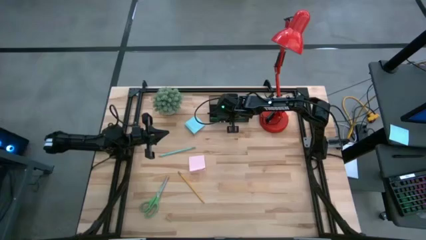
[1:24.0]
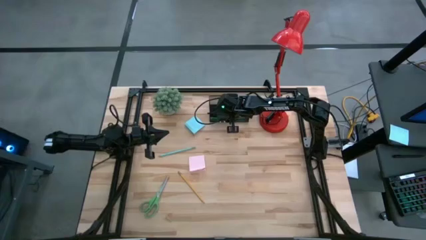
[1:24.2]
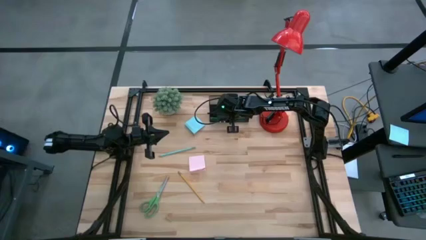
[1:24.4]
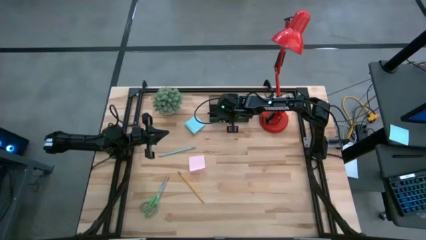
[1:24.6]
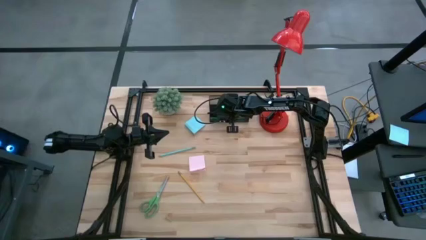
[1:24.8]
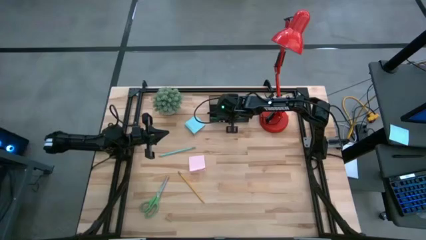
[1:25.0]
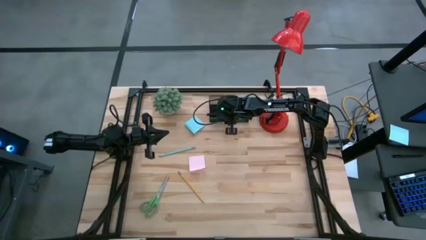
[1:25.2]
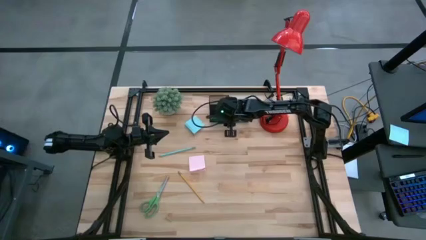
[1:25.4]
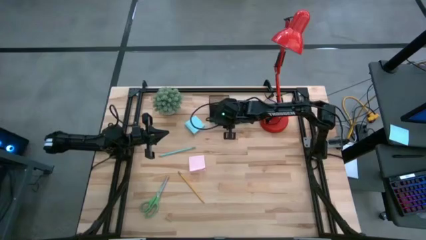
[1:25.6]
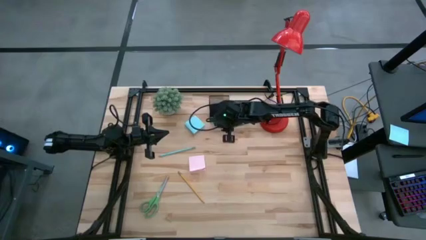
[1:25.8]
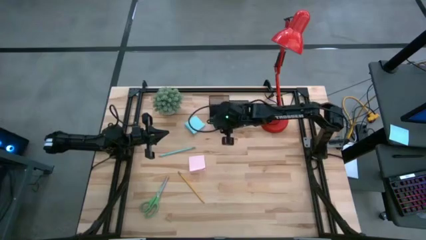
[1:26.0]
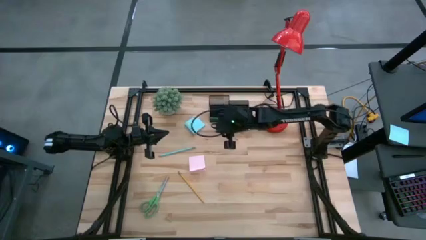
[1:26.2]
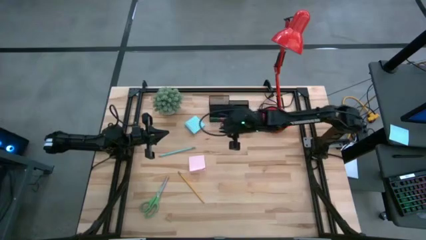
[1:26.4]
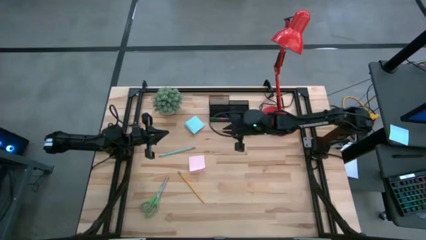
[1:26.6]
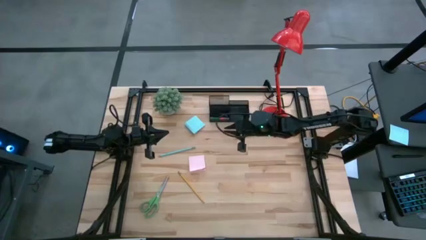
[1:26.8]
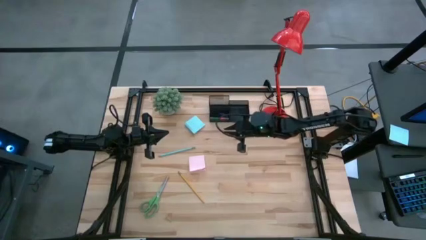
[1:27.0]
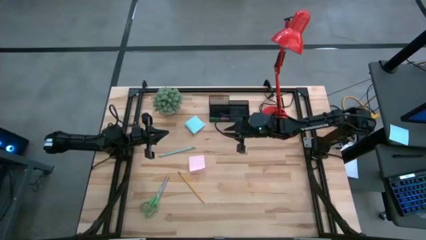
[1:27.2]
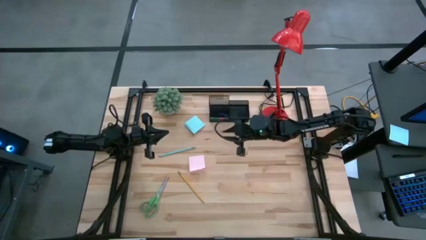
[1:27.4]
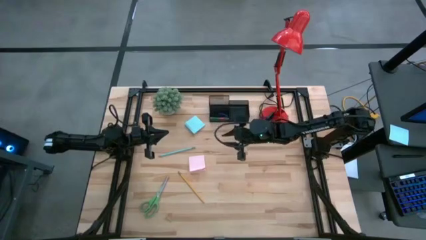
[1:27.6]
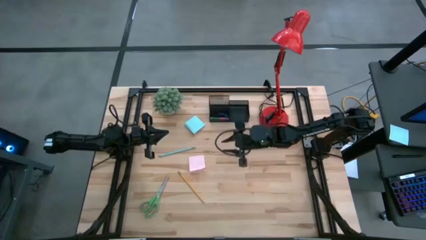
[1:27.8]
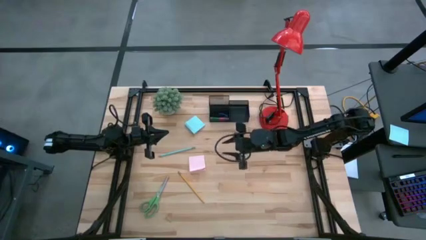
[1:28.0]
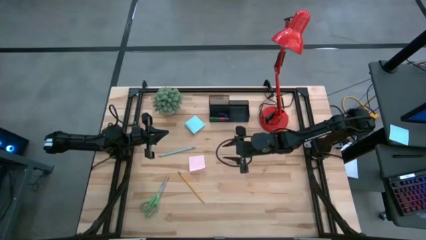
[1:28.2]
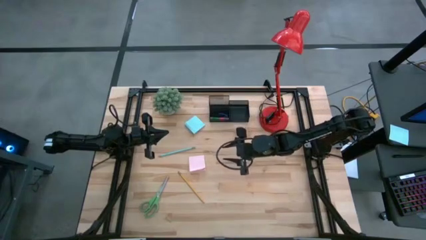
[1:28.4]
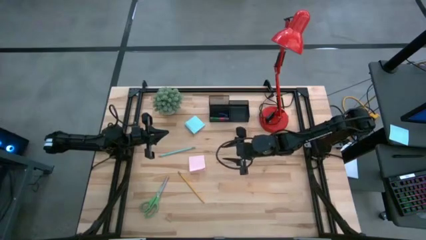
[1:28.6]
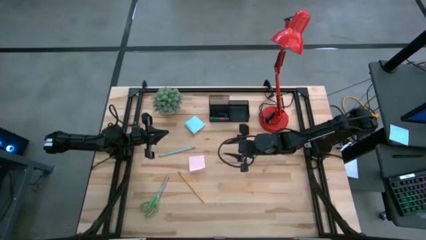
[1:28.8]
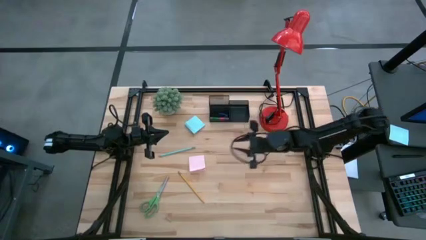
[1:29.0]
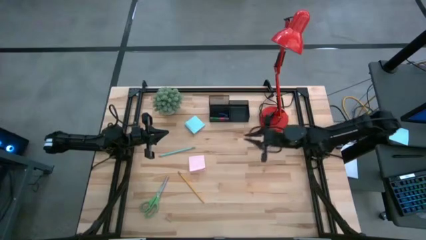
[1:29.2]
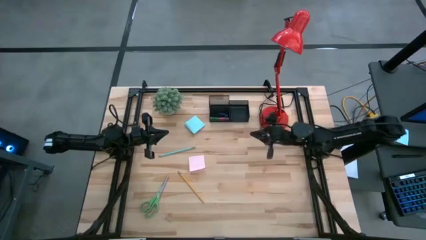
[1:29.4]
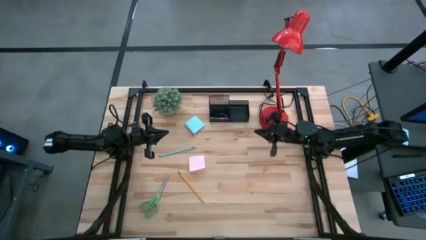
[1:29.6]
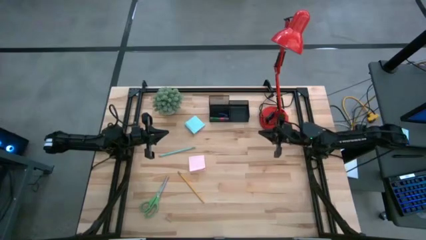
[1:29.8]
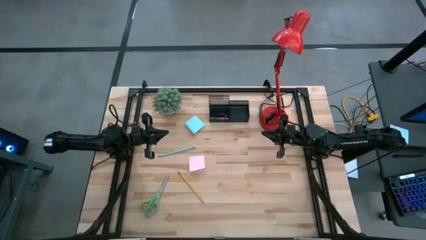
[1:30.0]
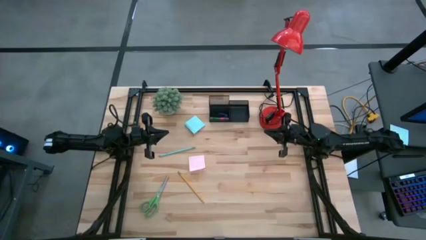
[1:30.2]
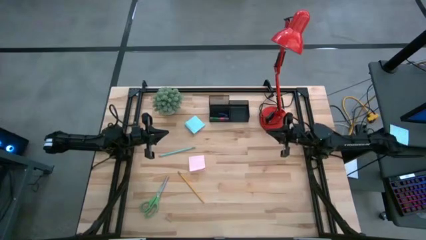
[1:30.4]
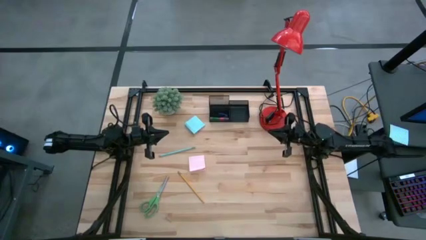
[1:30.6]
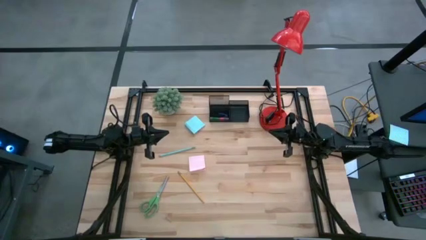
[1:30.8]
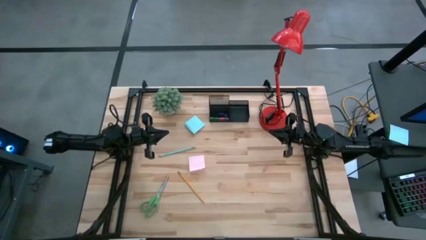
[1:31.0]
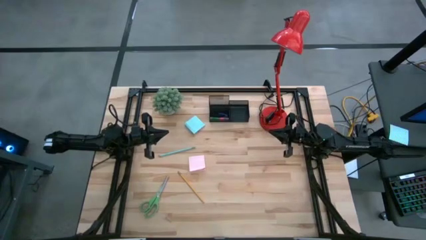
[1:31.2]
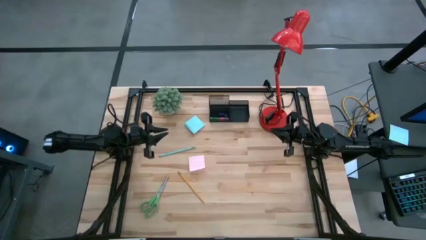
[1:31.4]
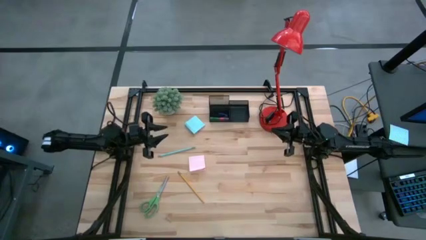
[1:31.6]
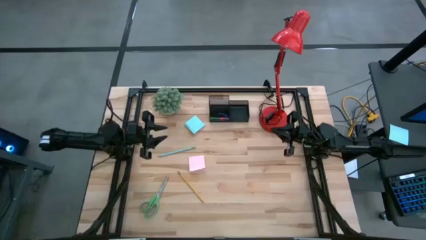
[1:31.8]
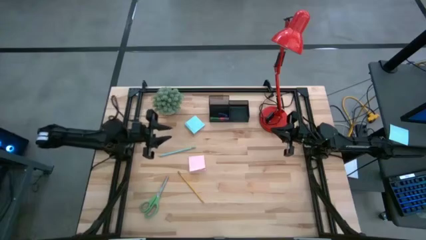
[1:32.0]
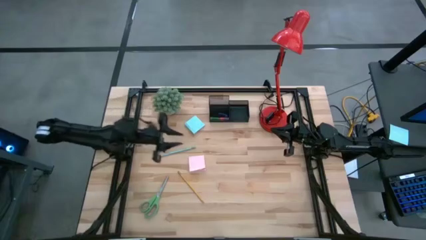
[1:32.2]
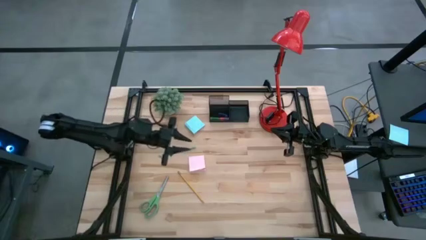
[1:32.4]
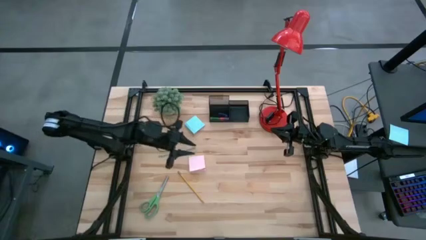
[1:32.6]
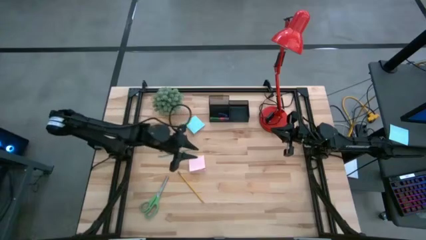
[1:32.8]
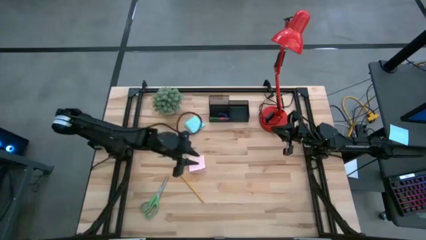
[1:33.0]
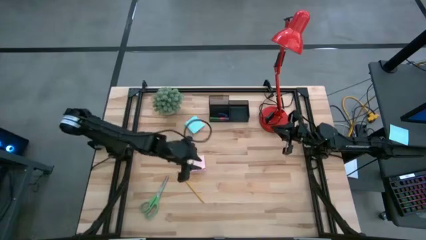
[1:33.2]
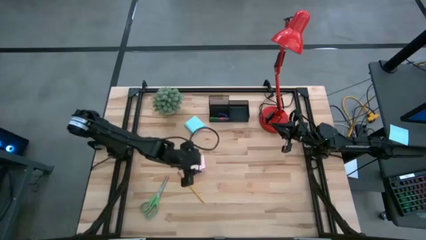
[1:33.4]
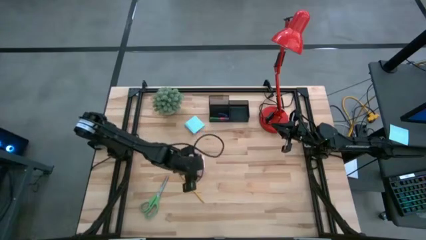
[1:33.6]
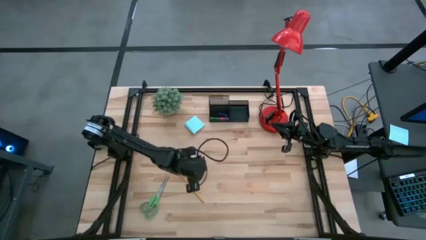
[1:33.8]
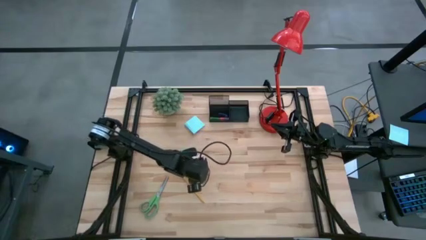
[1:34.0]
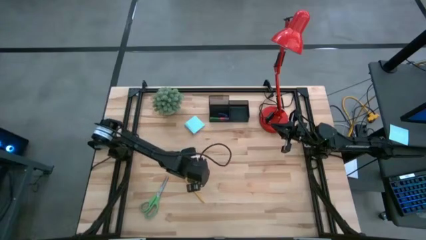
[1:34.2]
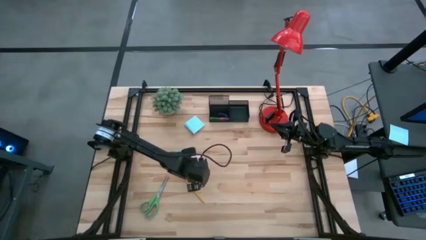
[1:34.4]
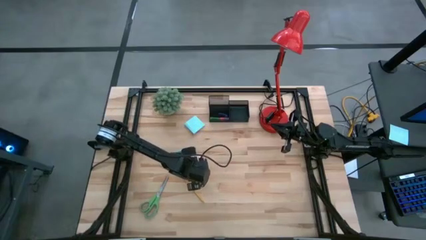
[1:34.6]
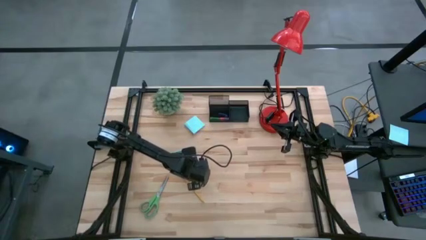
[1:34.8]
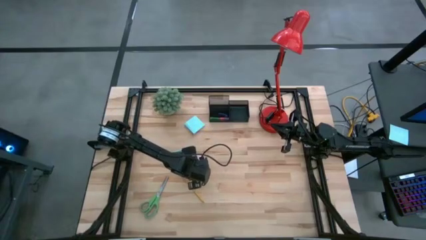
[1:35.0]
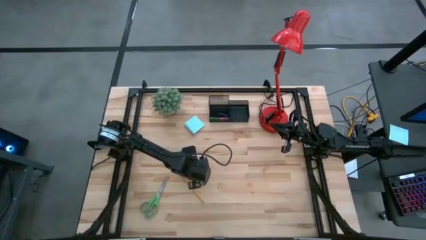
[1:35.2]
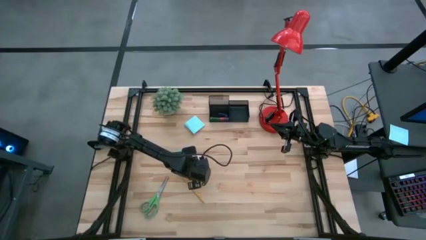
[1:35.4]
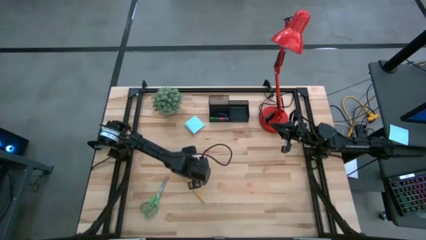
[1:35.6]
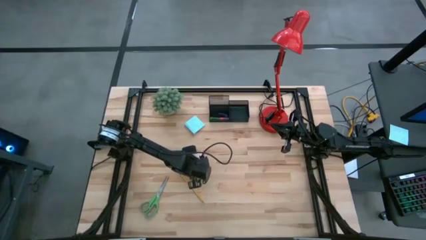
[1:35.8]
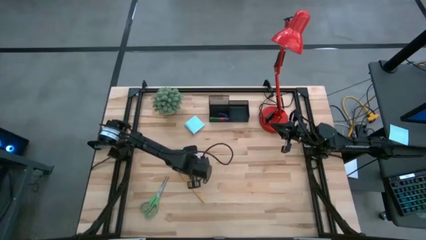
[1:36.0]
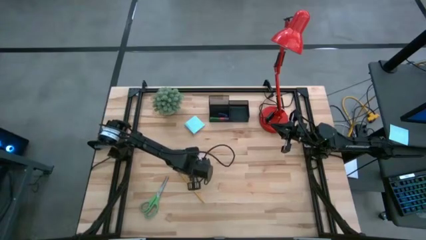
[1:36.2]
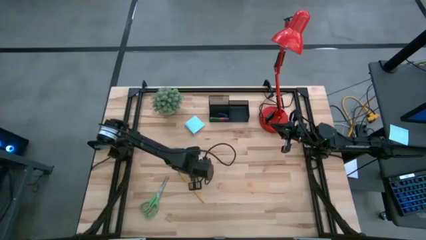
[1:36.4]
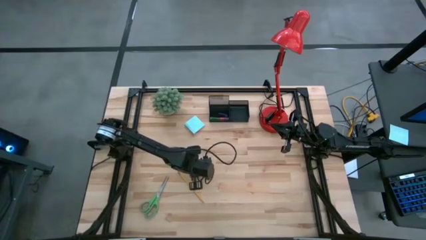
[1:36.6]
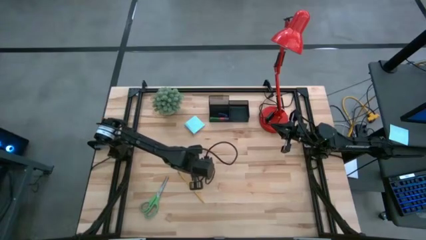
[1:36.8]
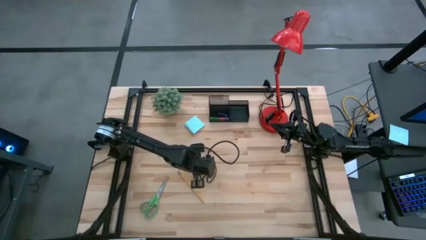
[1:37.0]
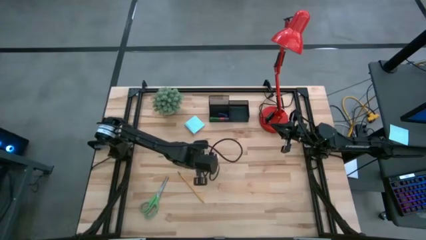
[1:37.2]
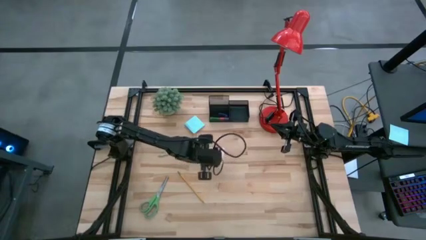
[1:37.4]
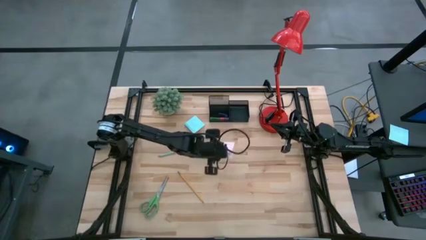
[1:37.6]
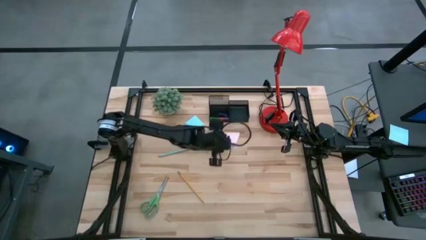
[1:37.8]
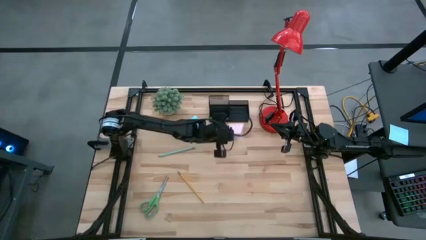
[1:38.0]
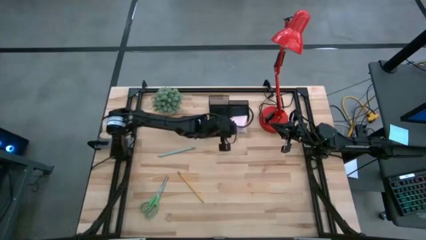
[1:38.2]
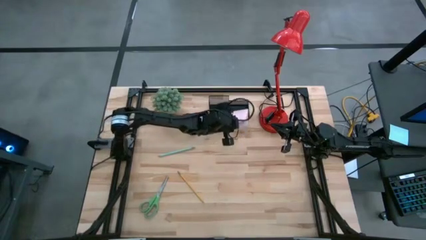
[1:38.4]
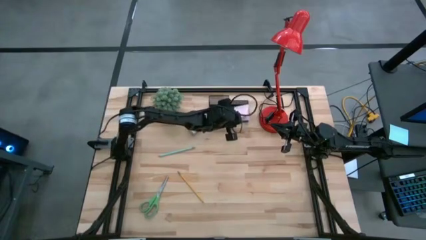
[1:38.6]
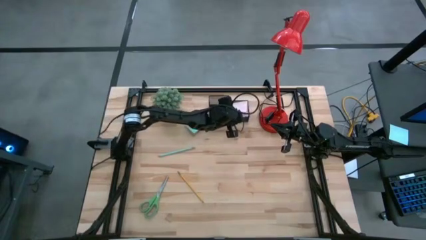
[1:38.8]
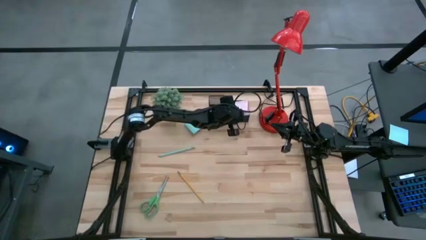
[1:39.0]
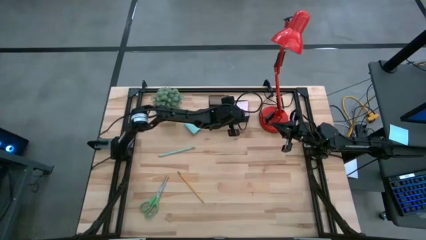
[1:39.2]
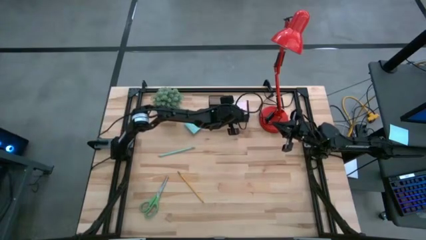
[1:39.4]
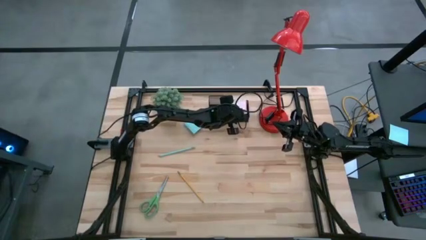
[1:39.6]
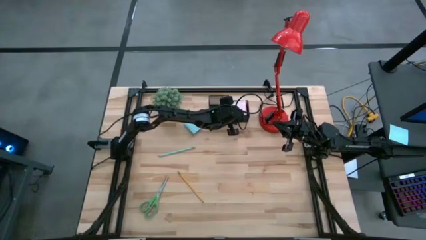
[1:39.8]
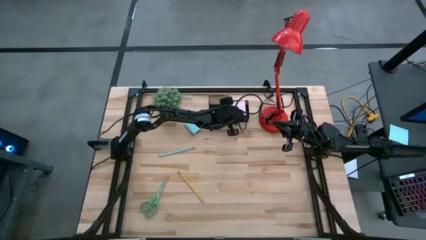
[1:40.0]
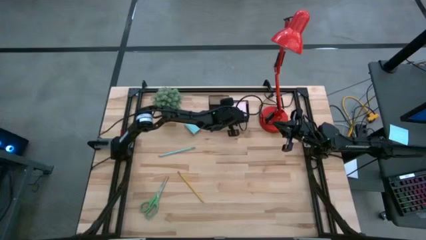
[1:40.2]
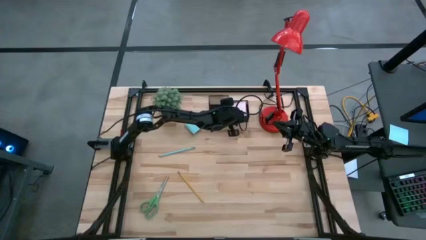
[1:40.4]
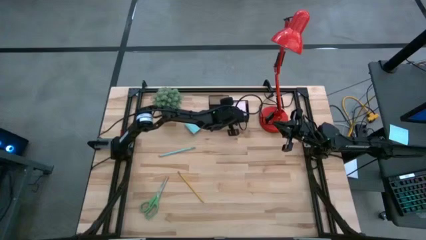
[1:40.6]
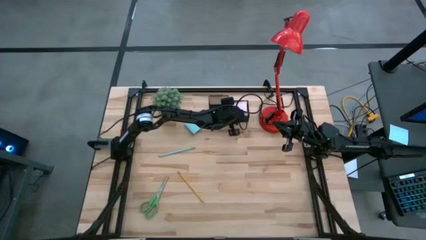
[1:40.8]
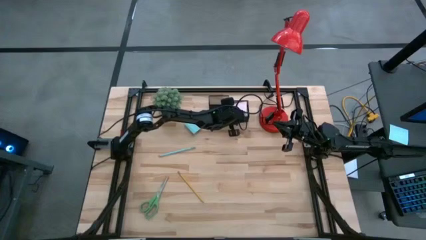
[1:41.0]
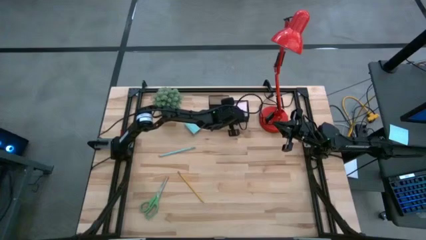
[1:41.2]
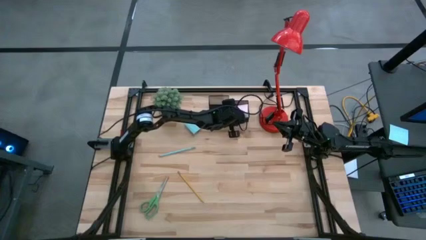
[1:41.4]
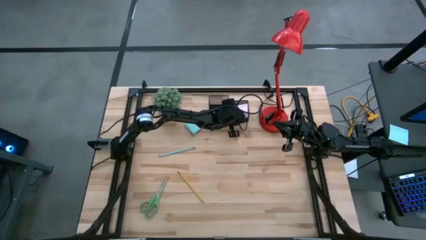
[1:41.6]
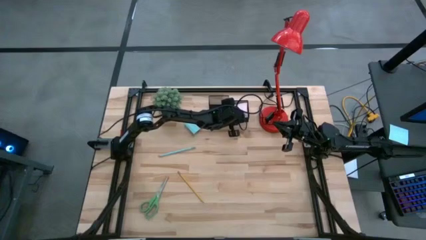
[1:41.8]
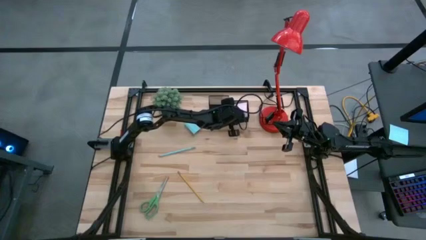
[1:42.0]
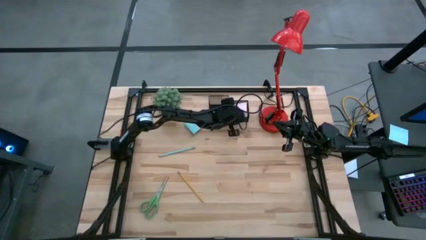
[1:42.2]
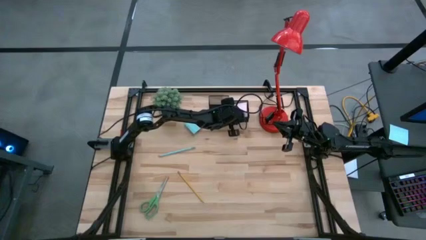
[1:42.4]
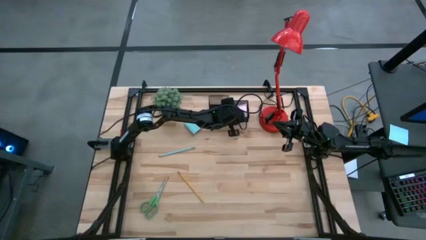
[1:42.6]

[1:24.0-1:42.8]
Task: Pick and place office supplies into organizer
Put the pink sticky notes into the desk organizer
